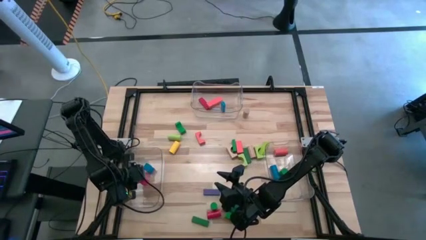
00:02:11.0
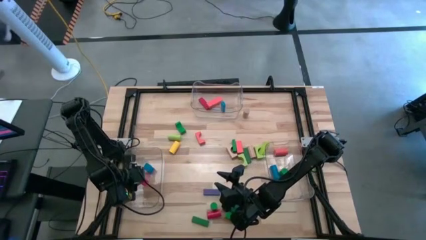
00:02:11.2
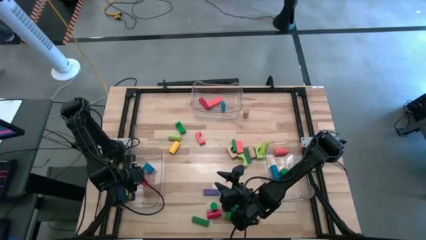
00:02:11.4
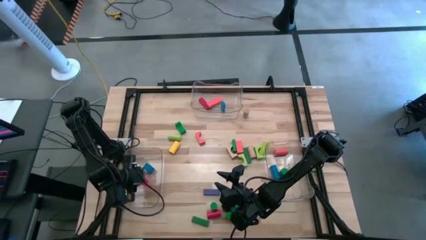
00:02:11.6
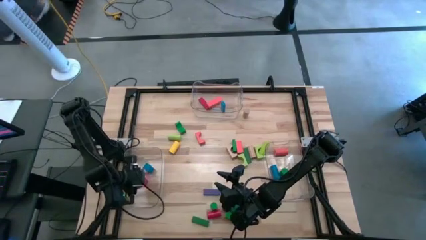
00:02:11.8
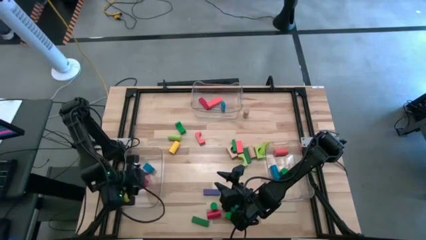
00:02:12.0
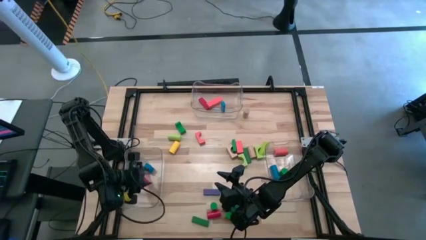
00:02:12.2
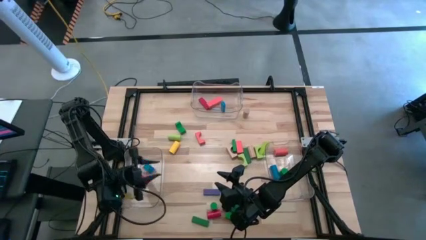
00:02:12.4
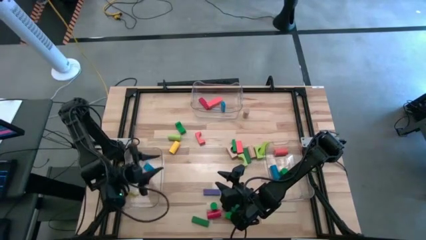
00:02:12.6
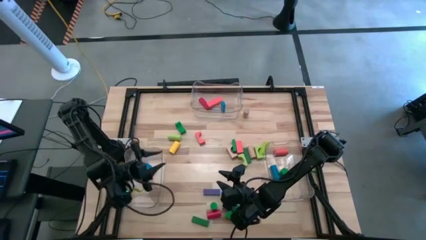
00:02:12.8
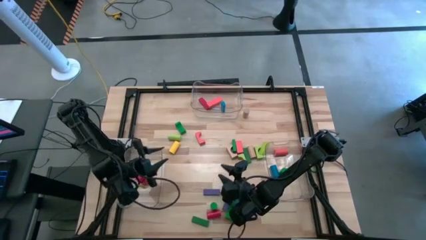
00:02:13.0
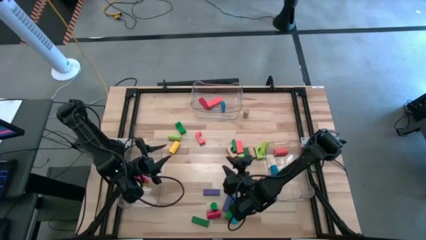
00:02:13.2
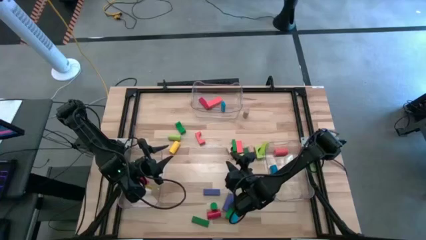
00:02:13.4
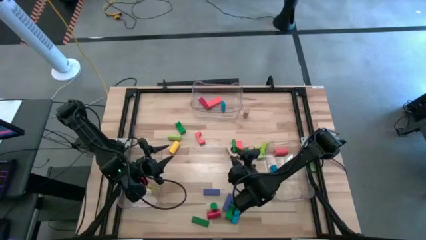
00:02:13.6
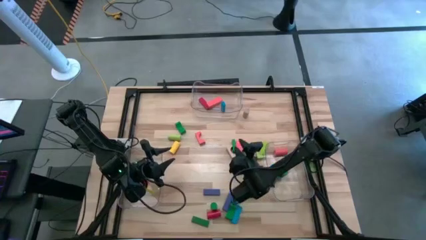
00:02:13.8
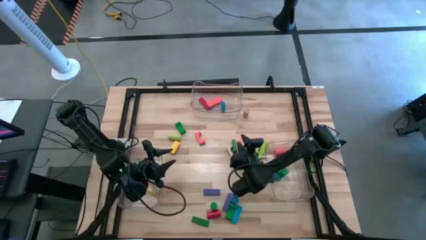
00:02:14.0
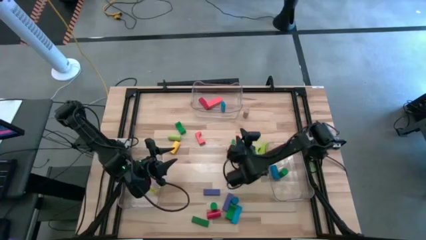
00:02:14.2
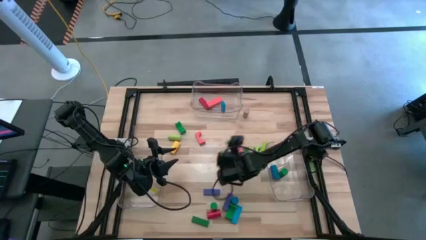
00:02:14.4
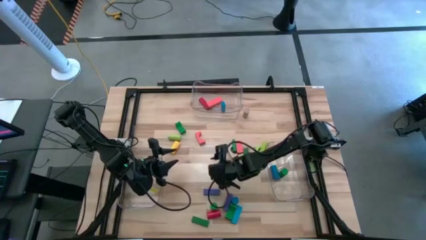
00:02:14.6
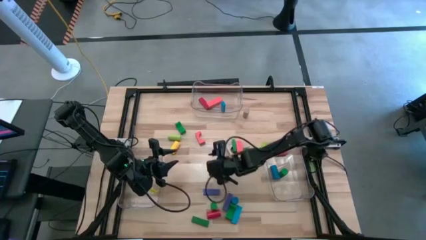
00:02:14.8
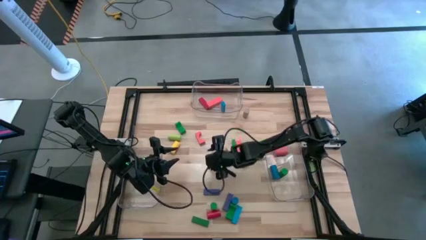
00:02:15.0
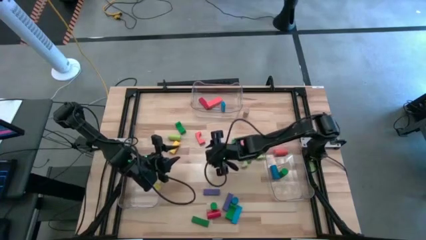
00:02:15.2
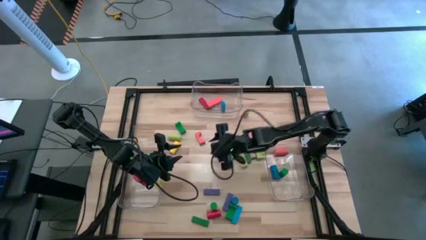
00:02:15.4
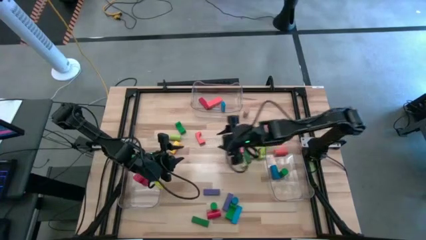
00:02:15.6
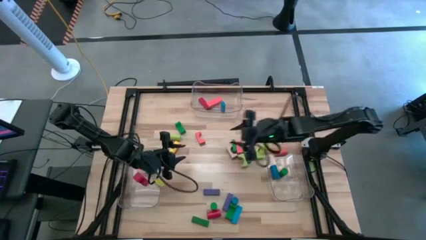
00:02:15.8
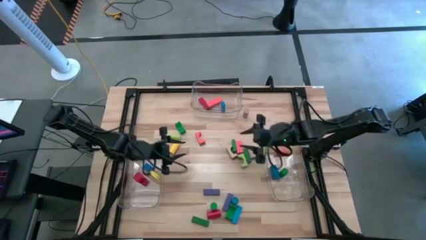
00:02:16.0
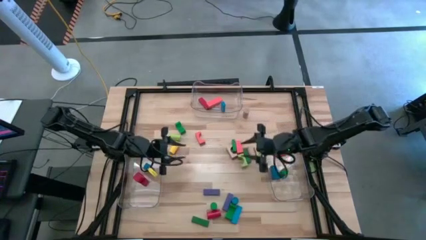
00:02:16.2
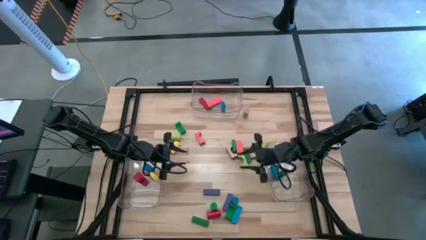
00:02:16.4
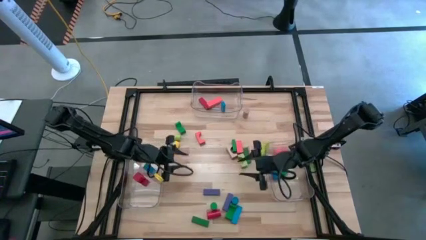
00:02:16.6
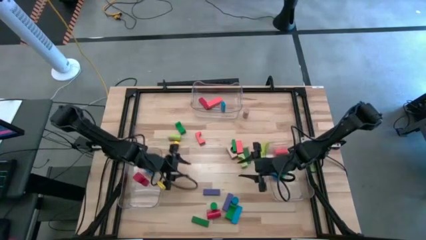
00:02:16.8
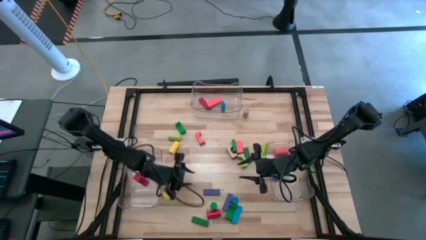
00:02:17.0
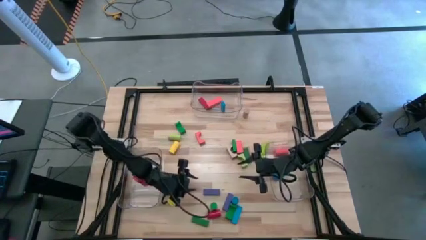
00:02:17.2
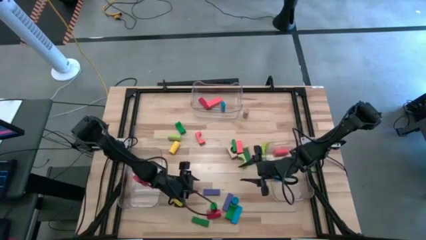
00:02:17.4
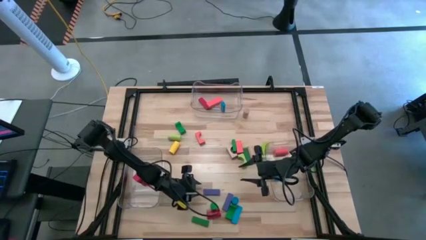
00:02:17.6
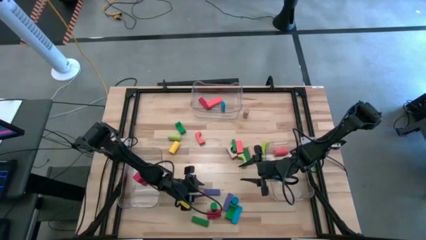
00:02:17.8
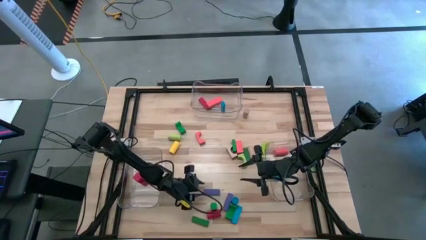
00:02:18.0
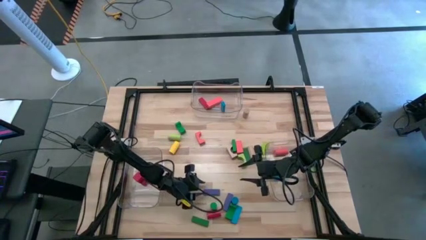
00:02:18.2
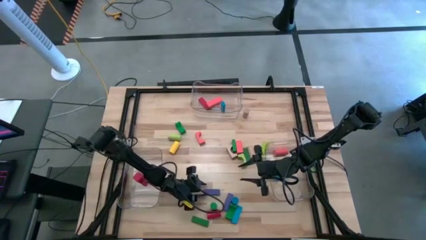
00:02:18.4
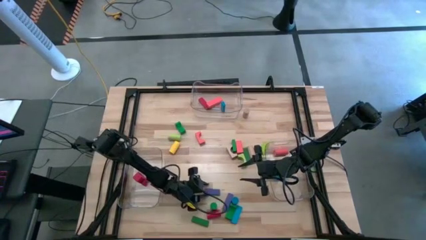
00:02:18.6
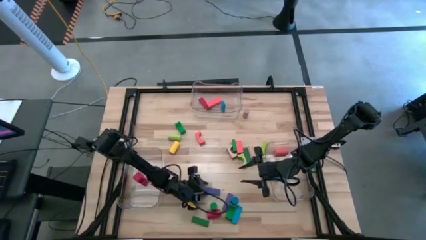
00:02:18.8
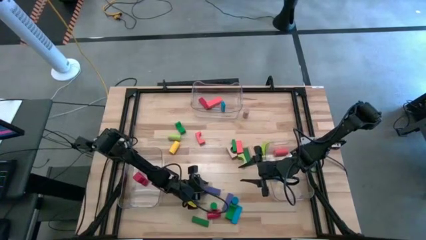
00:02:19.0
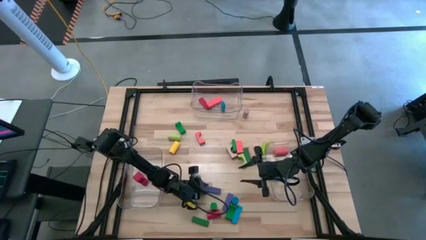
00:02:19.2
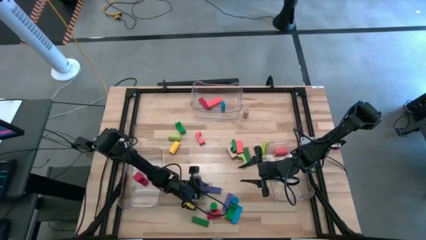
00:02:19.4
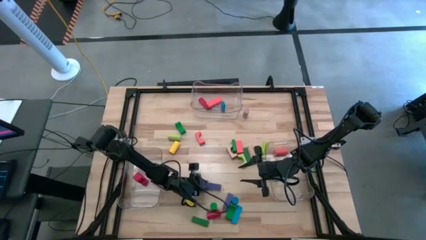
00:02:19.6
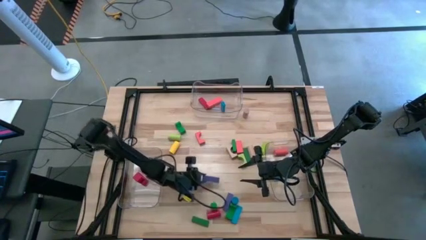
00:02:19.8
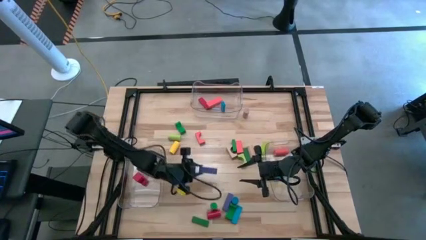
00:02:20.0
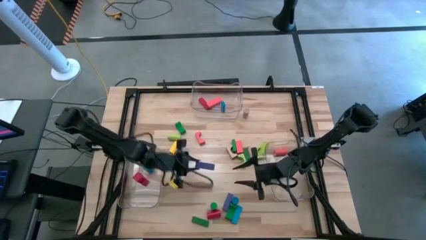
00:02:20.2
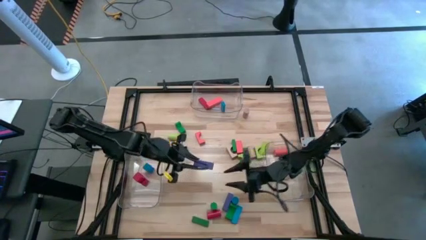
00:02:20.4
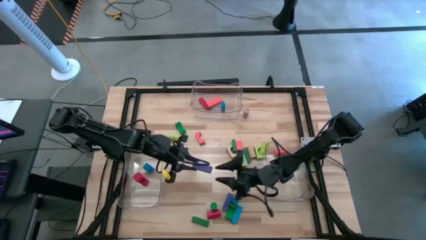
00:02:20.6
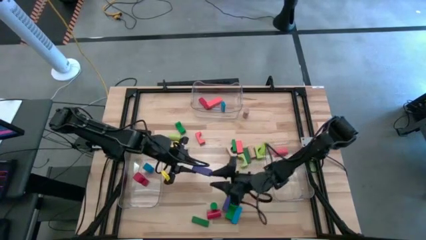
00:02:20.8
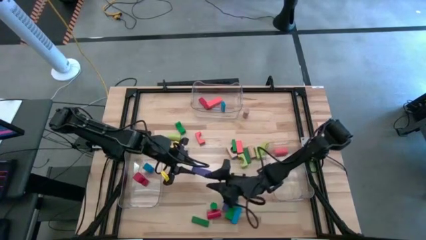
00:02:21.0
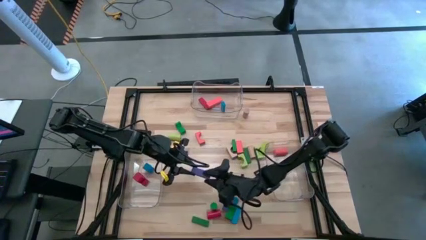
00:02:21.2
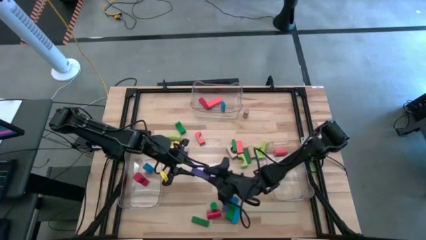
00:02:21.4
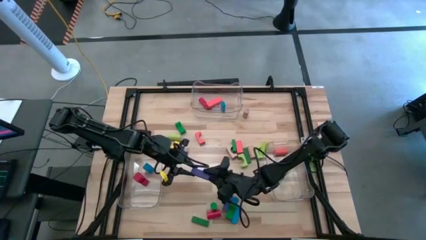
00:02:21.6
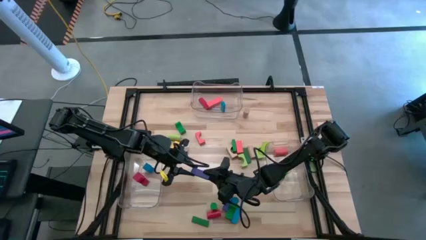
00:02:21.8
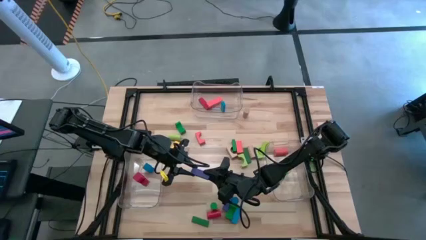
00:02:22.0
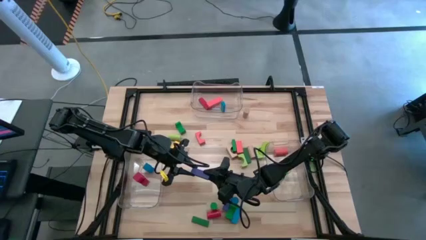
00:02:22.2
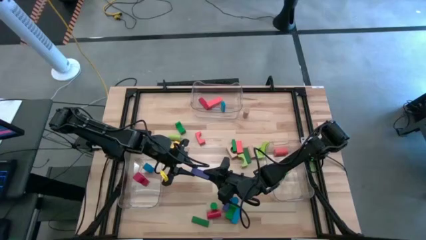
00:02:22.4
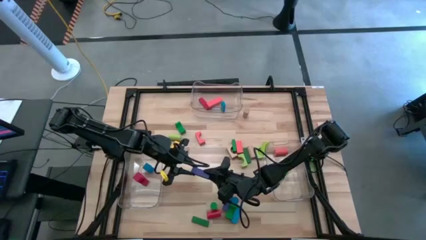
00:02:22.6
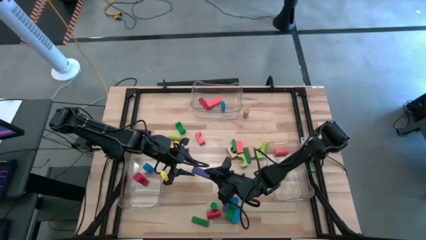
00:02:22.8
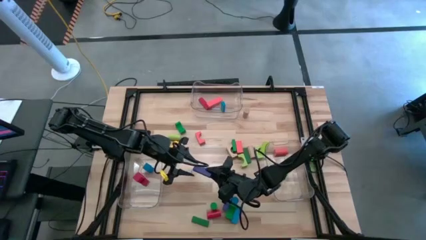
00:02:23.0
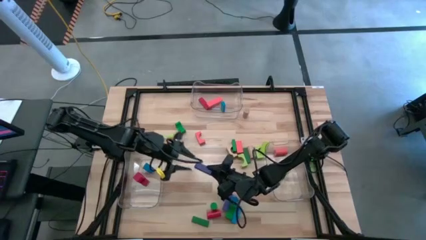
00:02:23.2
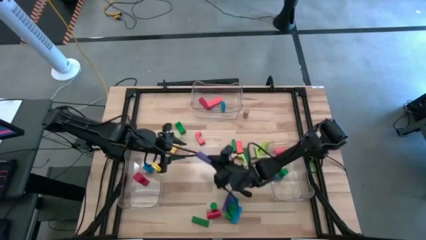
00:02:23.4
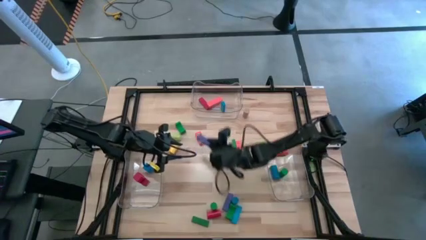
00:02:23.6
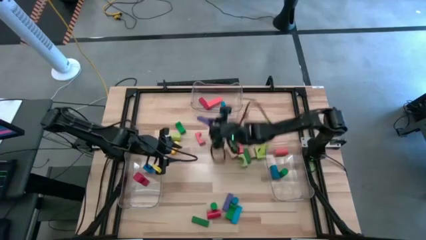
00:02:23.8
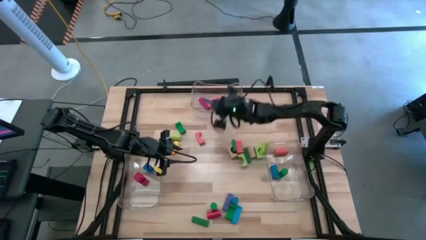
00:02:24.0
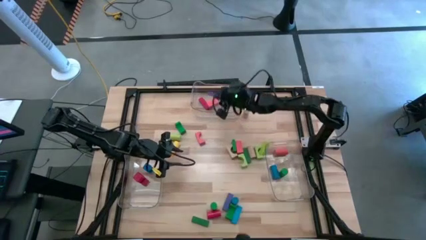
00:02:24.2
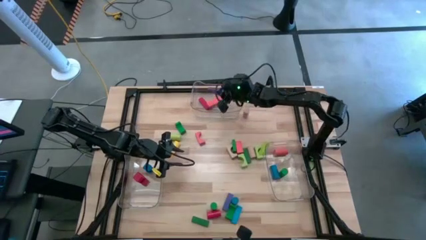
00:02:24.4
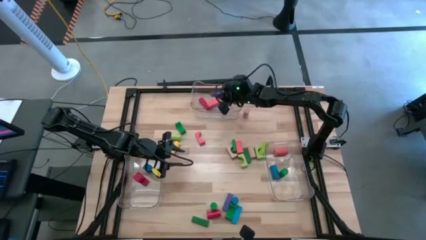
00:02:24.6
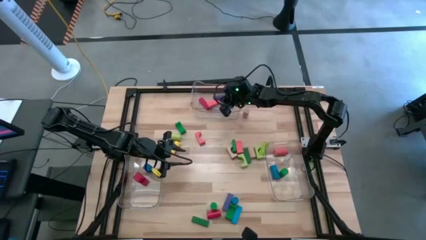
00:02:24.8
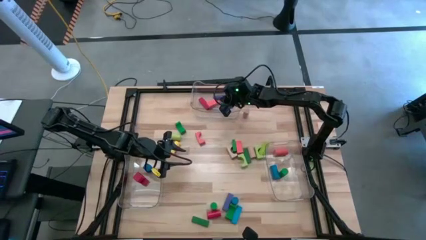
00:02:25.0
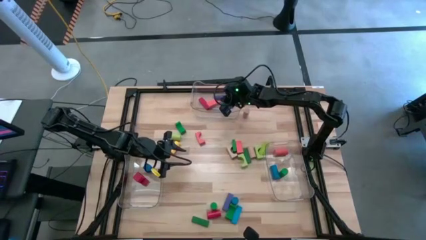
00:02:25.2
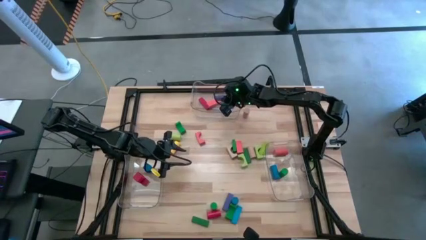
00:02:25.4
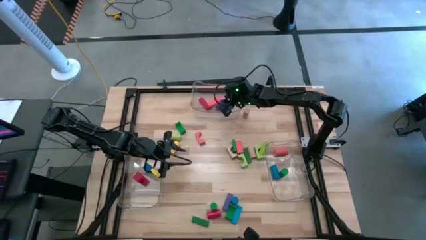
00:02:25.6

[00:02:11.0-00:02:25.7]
Task: Sort blocks by size
Put the blue rectangular block into the top transparent bin
